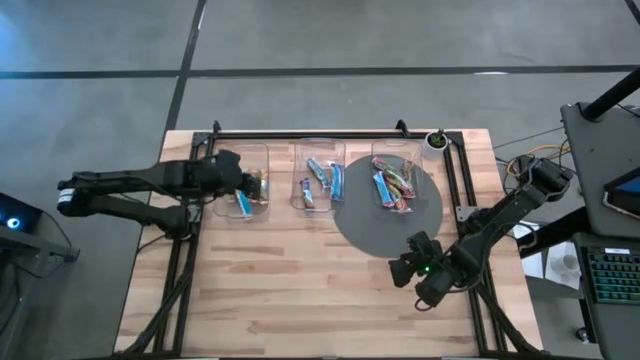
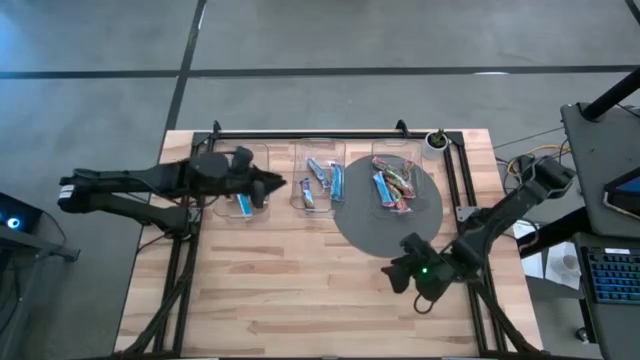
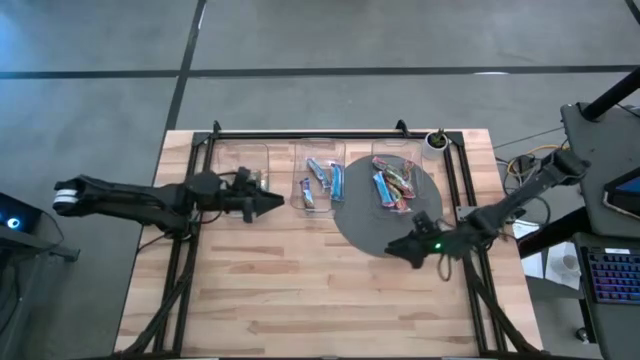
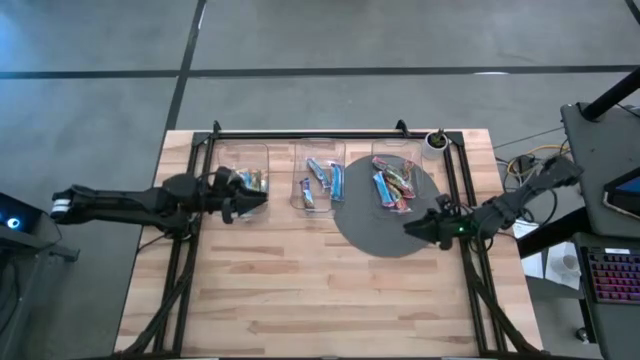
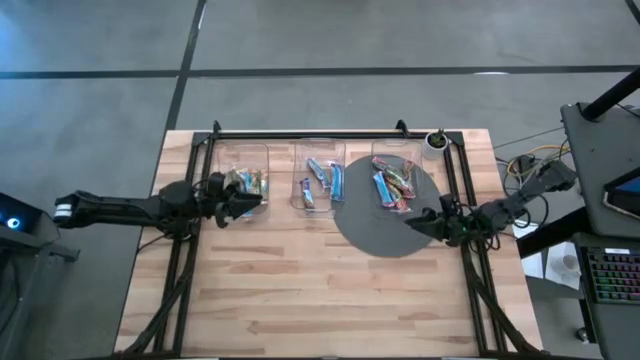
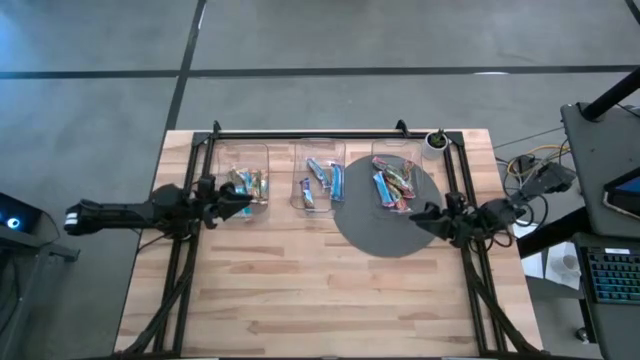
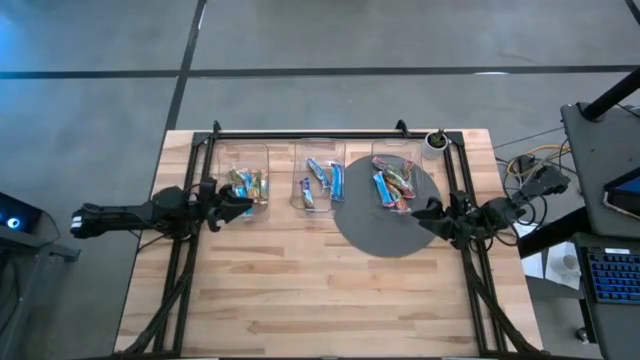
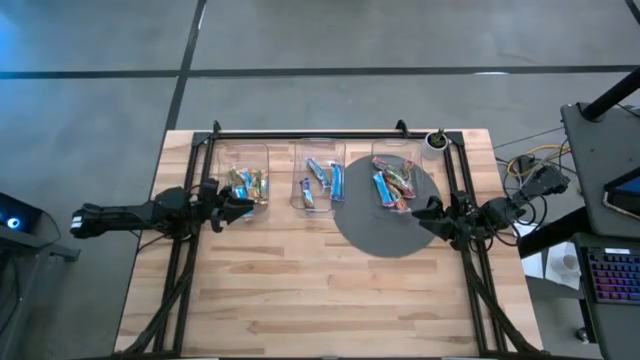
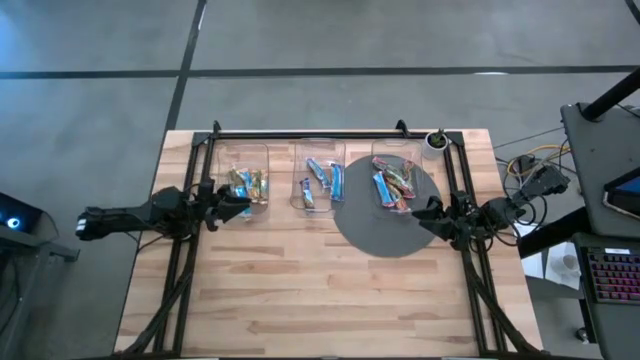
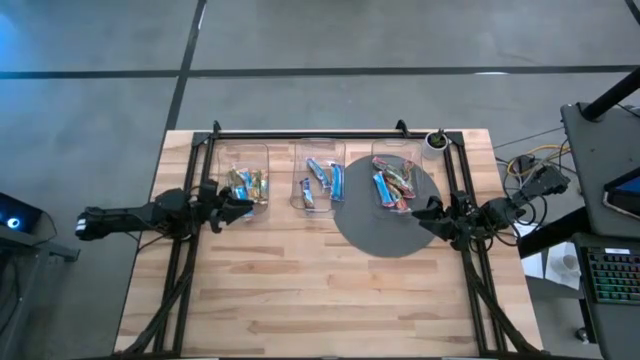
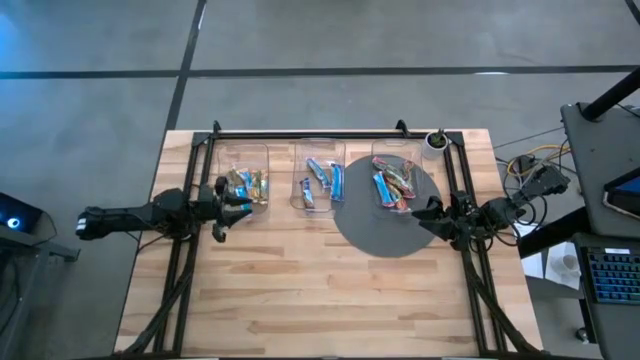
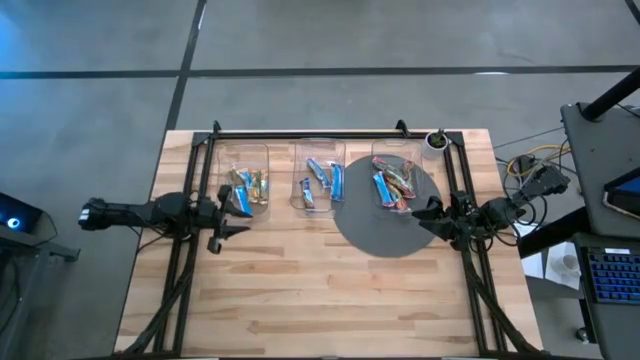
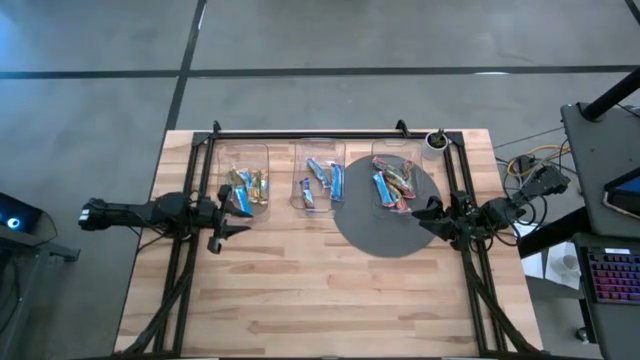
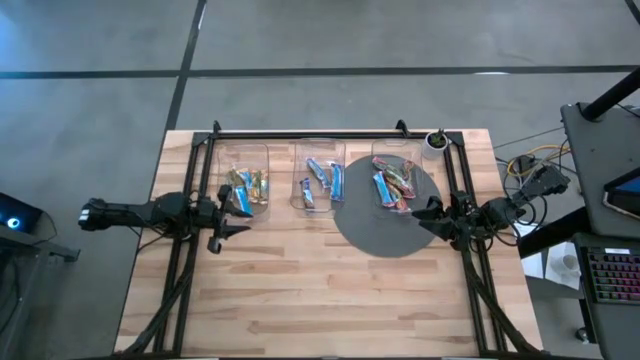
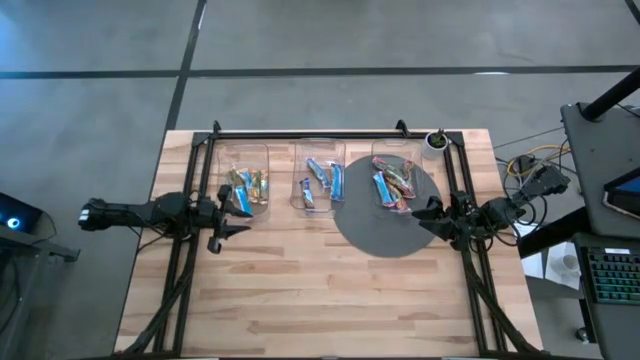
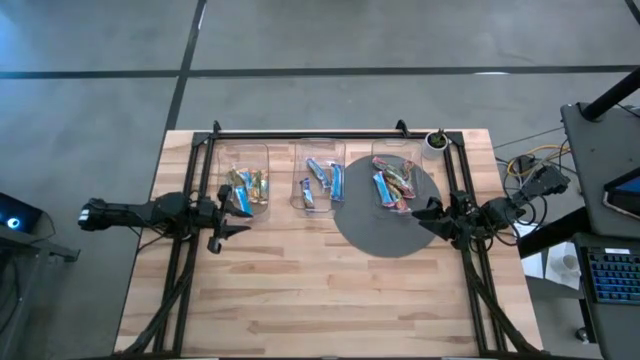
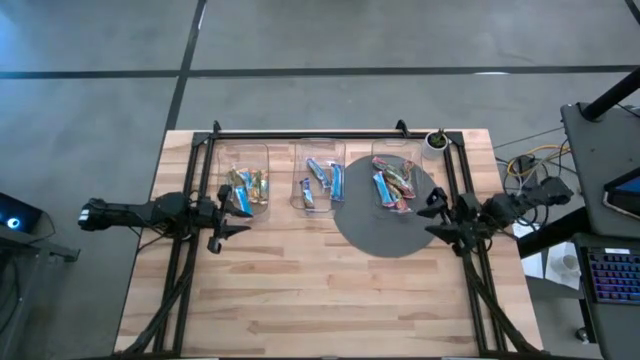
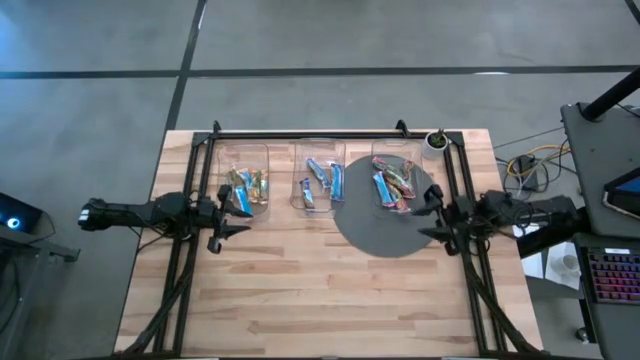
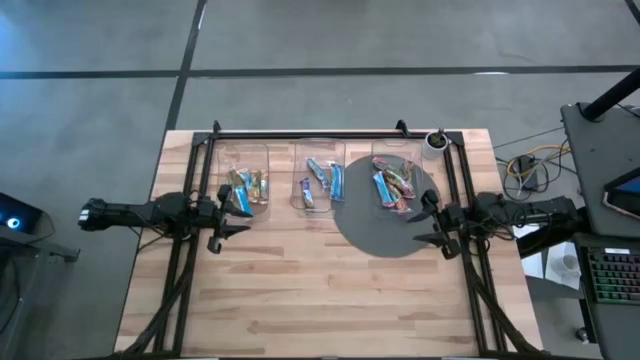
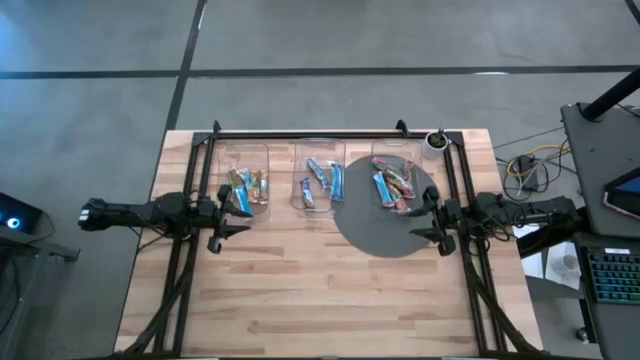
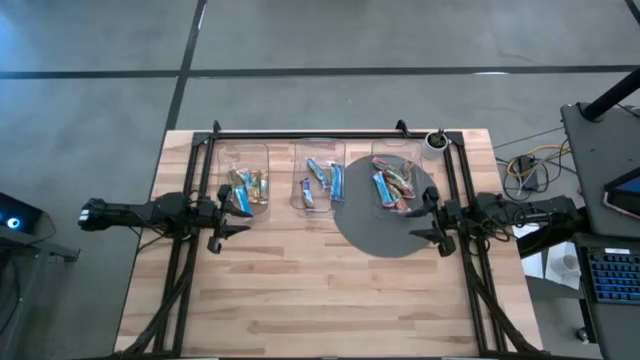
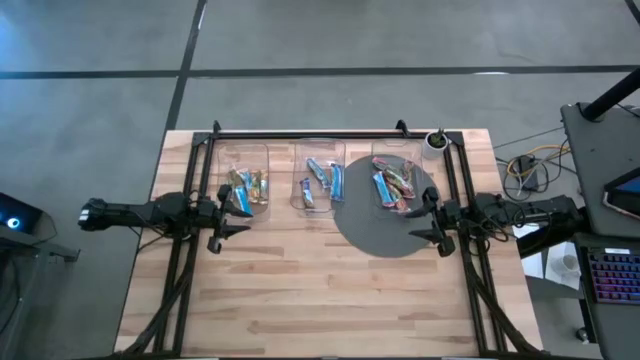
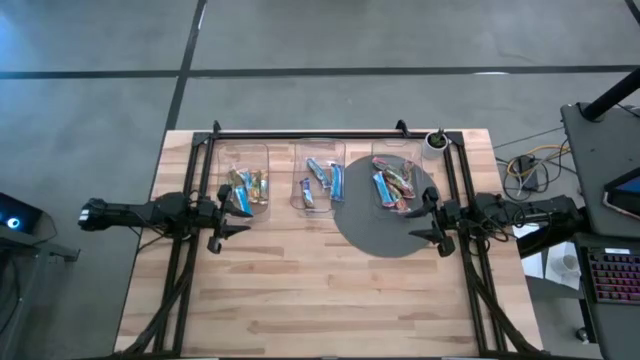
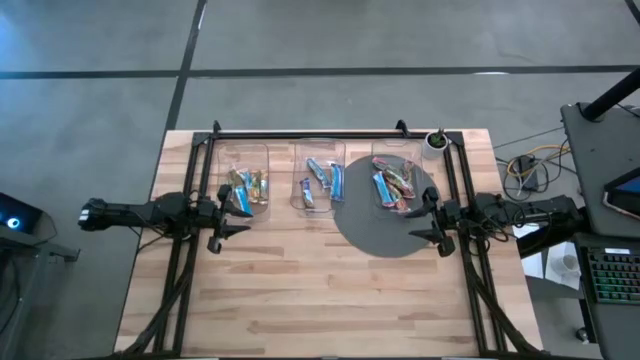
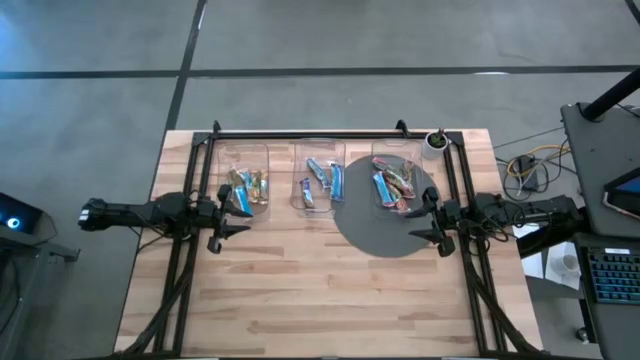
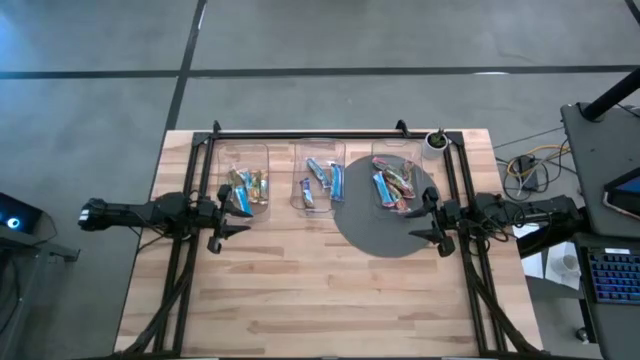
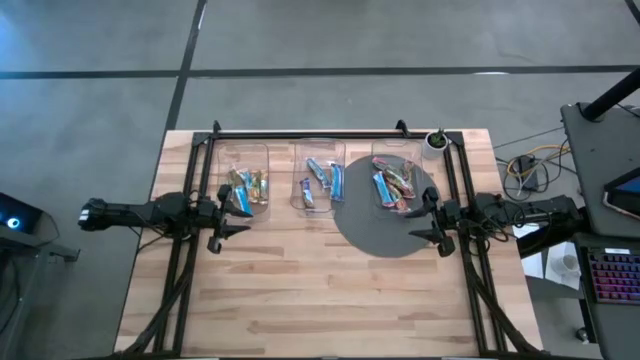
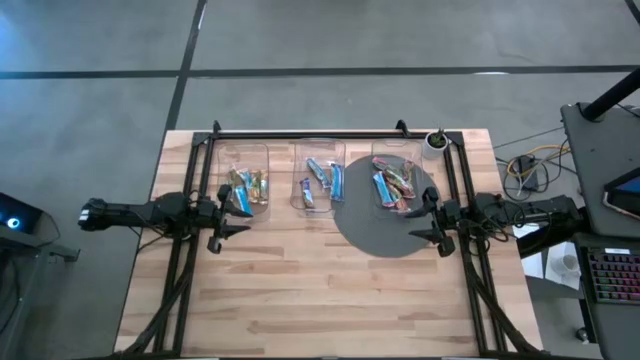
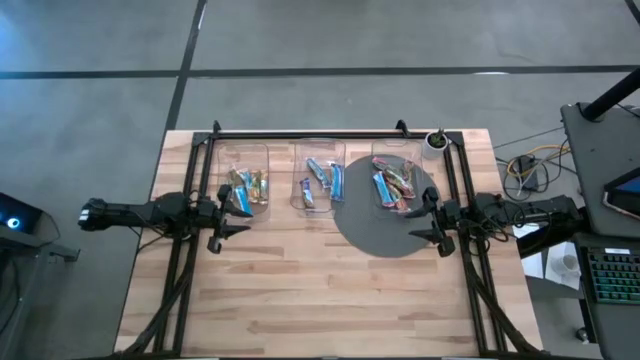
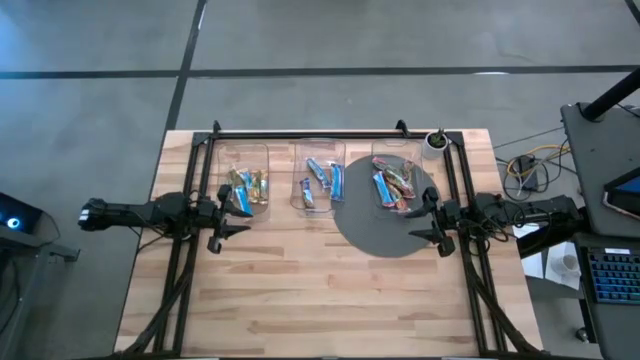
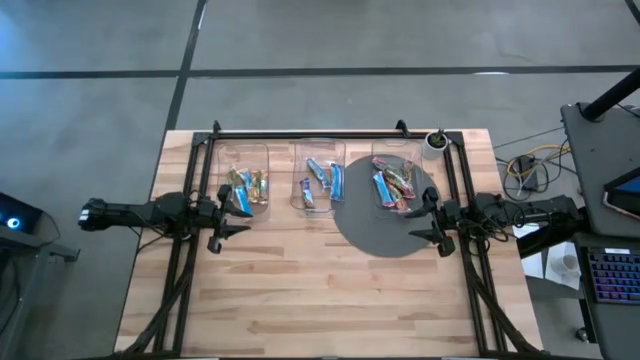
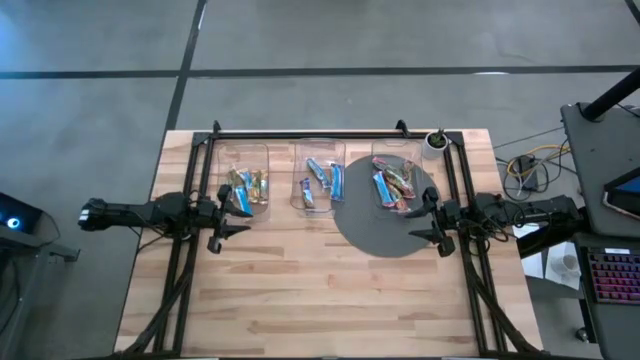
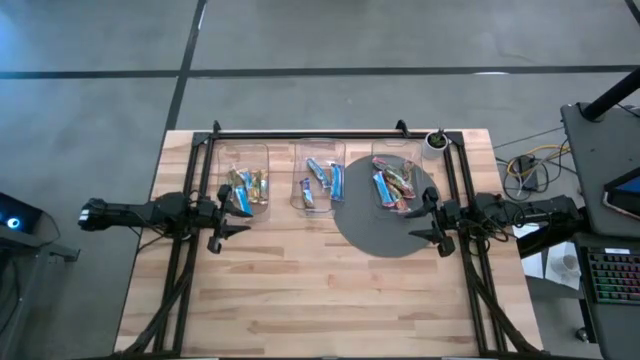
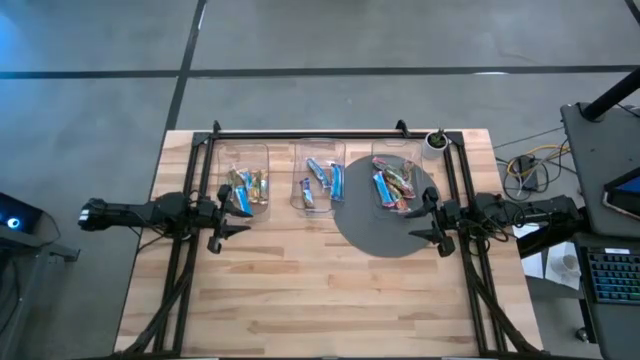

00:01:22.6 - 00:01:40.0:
Task: Pick and place Granola Bars by type
Return to Home Position

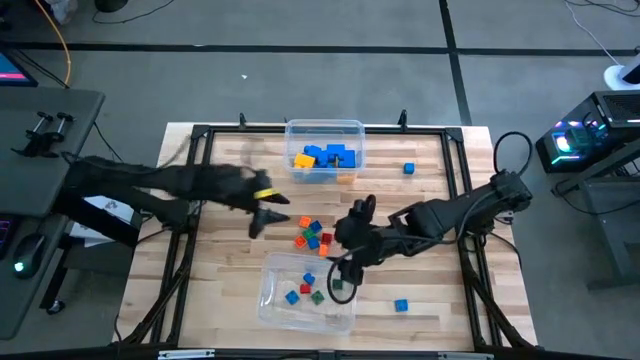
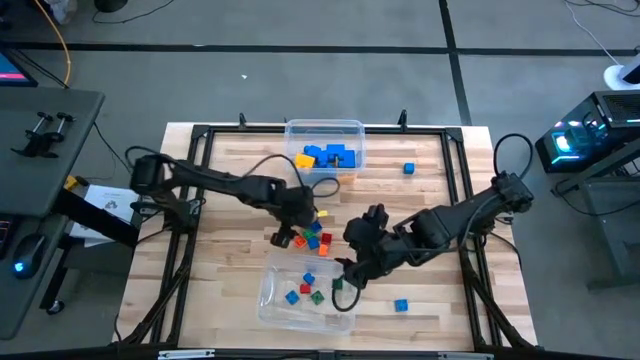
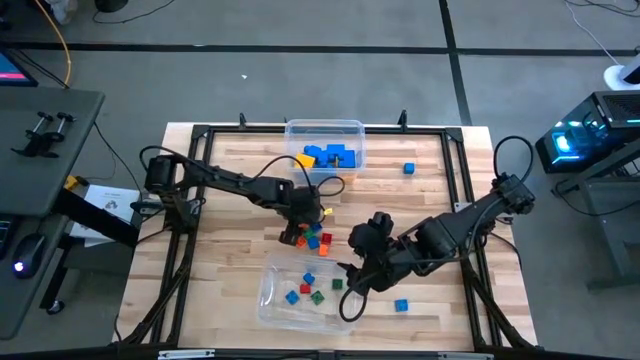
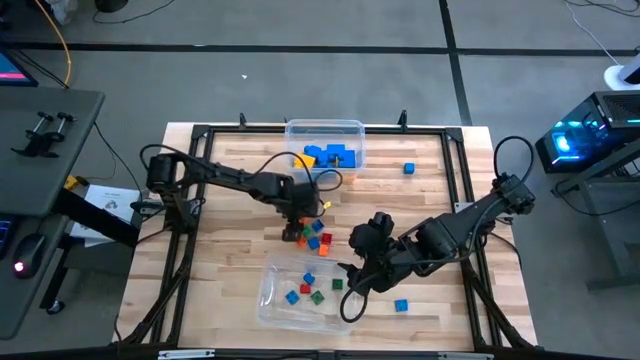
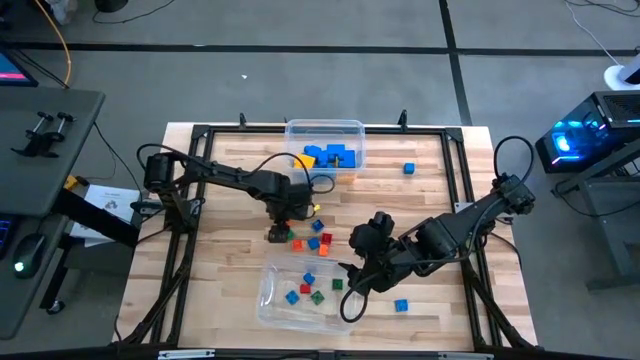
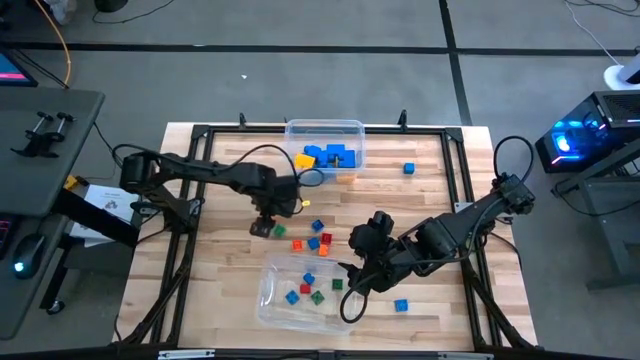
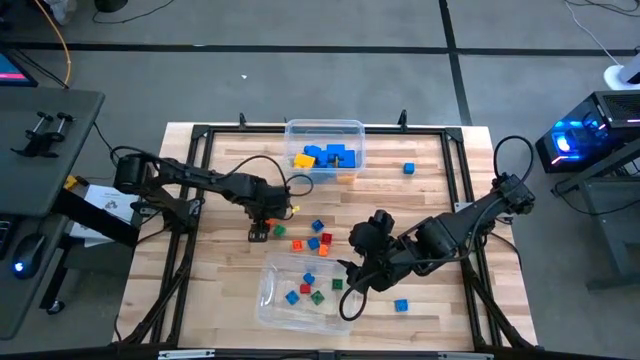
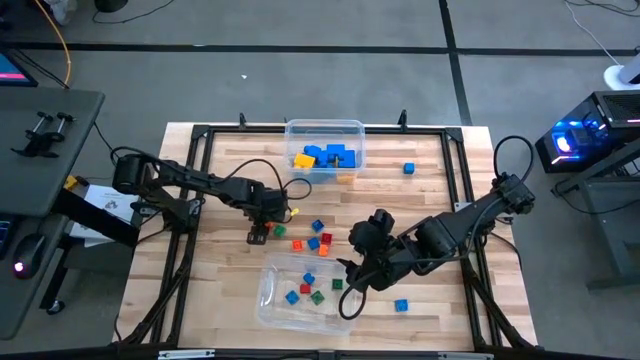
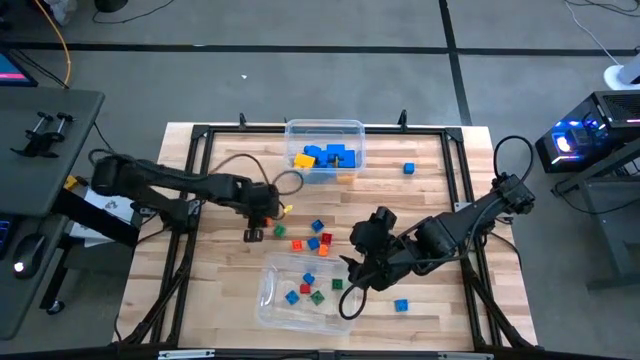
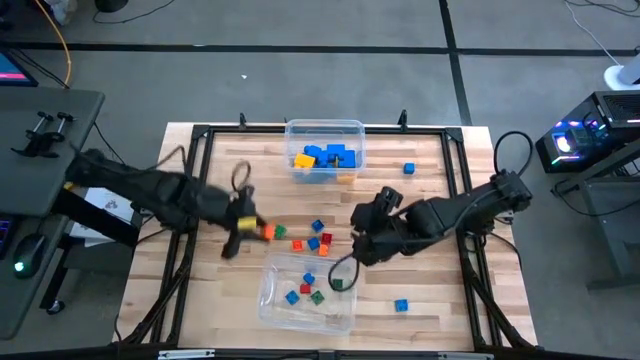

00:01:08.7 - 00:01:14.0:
Task: Sort blocks by size
Put the orange game piece into the bottom transparent bin
